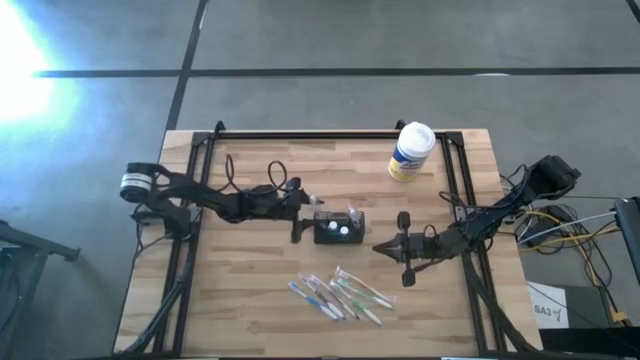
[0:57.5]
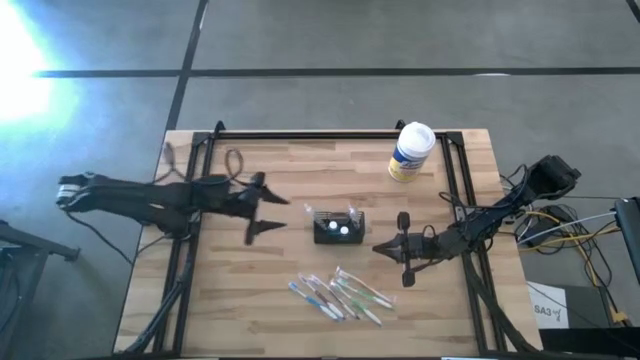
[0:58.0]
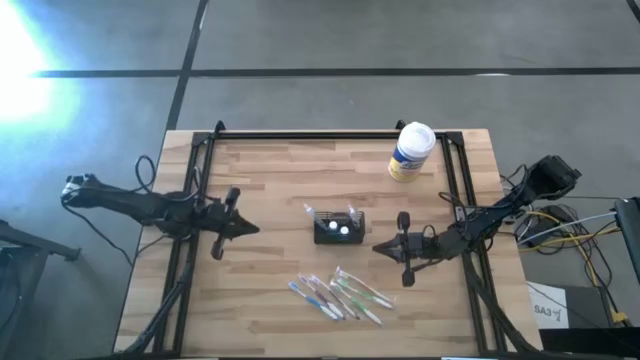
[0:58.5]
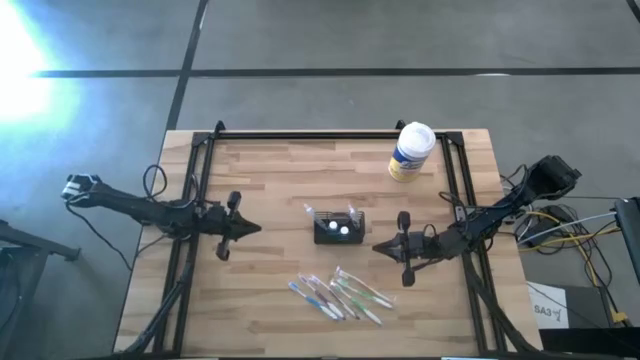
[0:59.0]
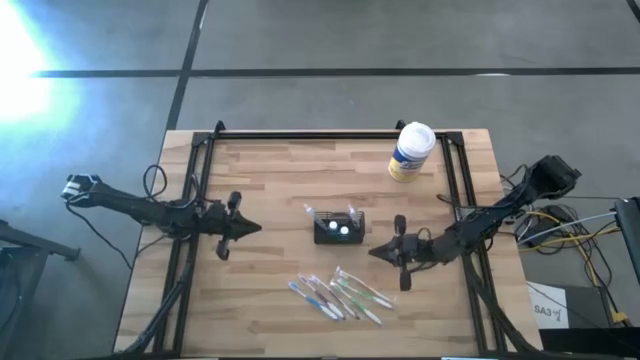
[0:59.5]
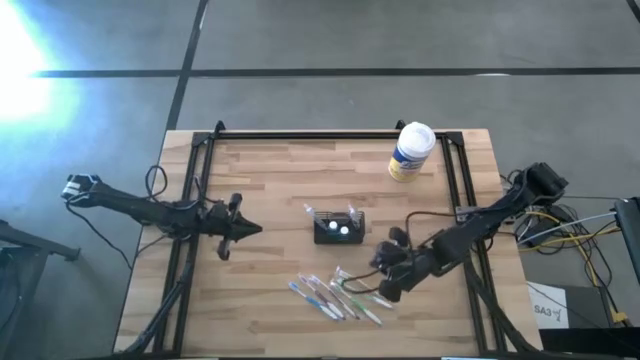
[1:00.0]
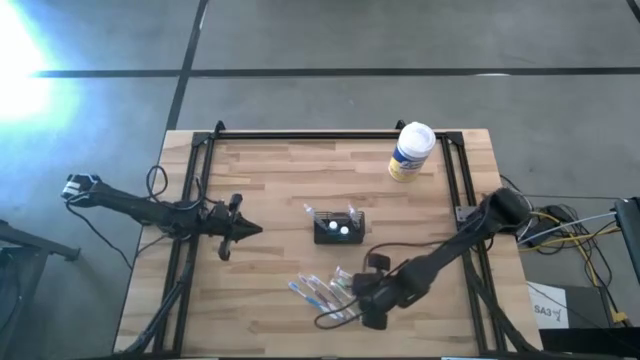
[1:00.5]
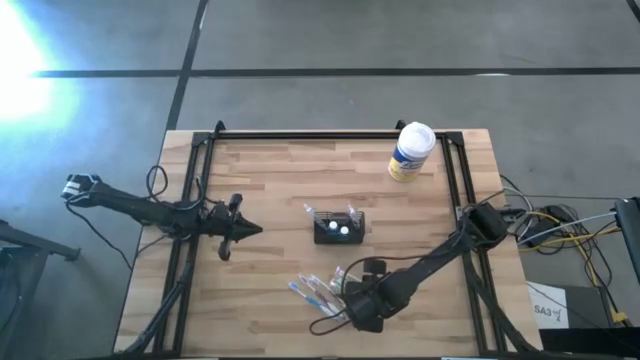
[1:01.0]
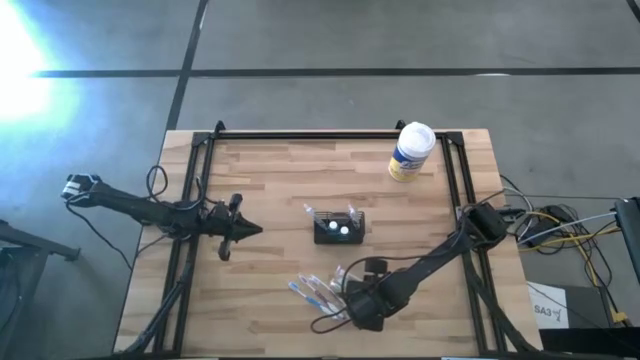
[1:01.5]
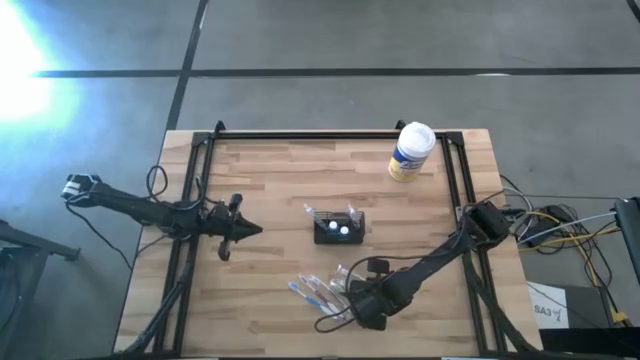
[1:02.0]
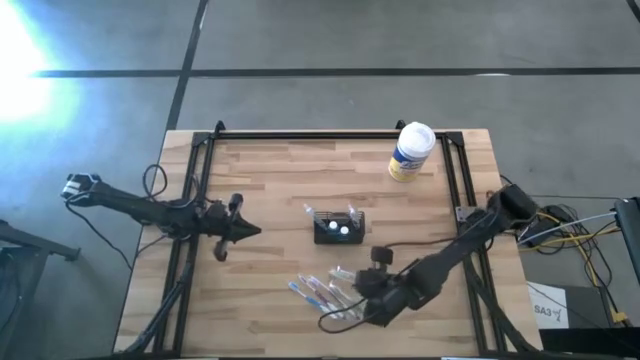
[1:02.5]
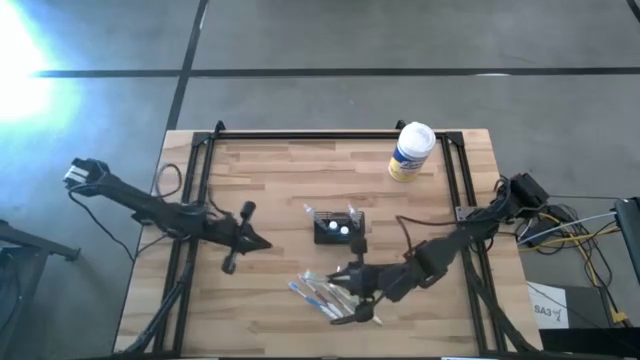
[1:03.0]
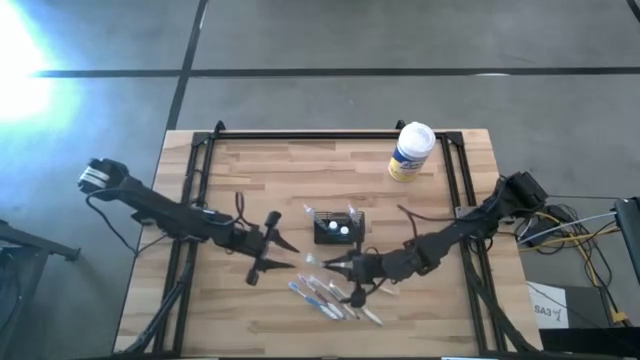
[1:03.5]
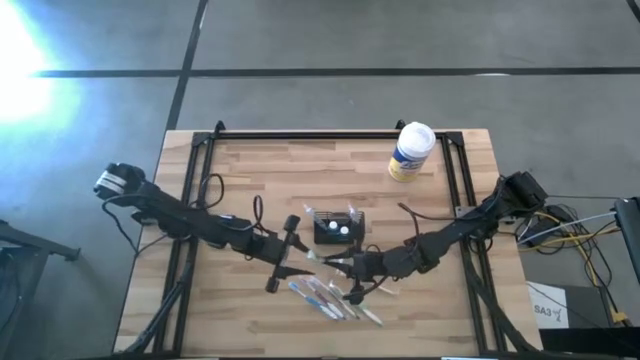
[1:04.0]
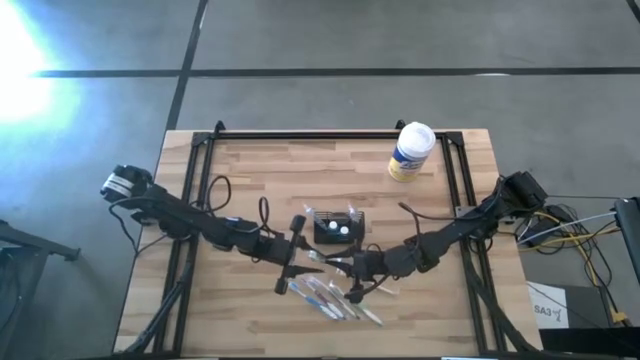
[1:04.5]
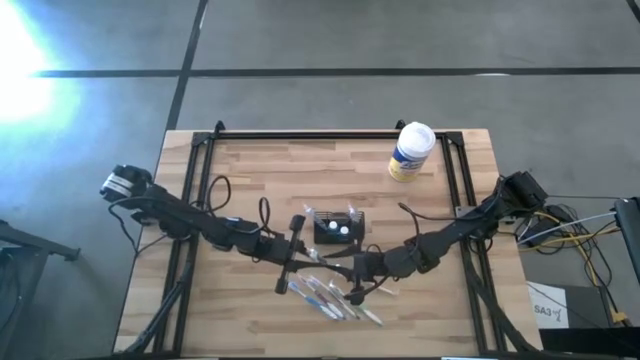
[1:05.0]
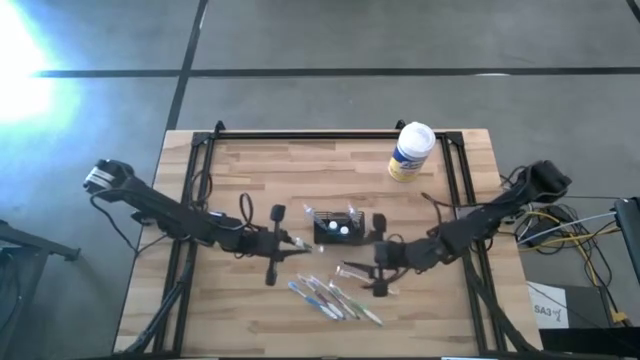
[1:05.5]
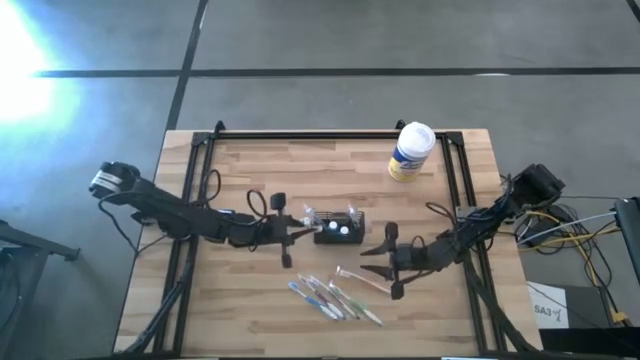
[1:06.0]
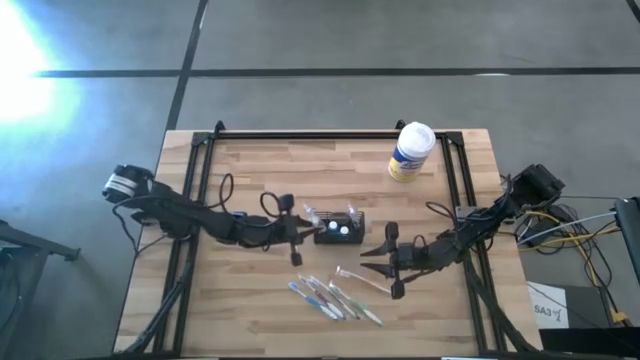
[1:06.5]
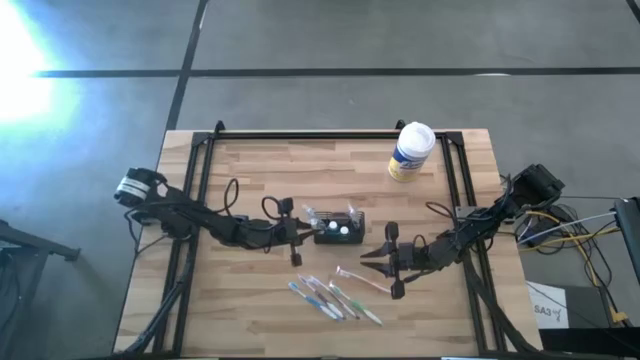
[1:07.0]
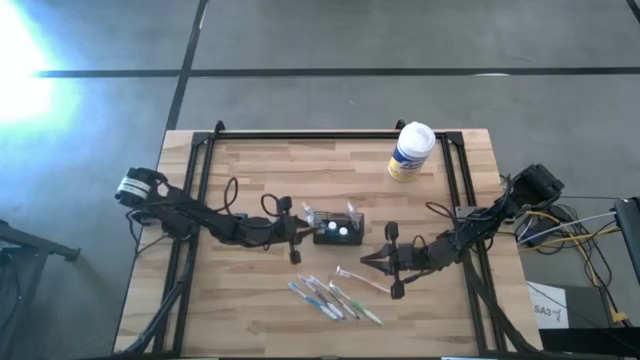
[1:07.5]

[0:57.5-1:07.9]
Task: Pick & Place toothbrushing station
Put the right green toothbrush into the black mesh organizer

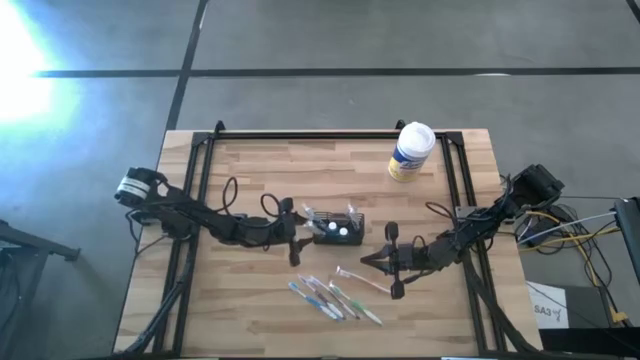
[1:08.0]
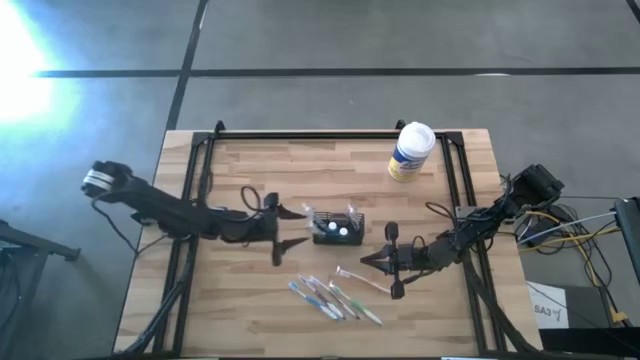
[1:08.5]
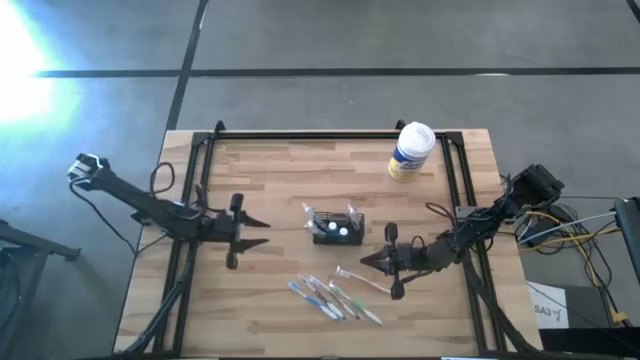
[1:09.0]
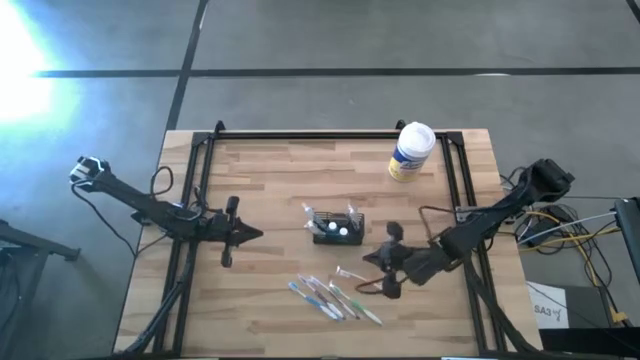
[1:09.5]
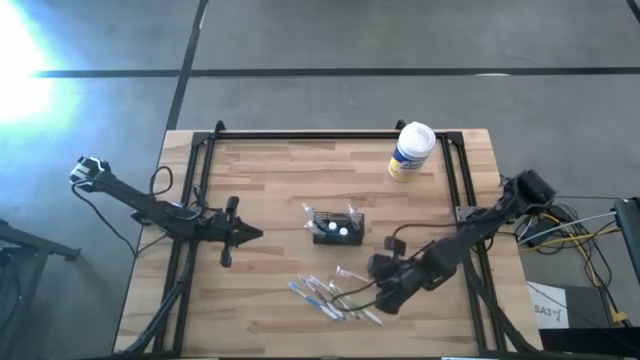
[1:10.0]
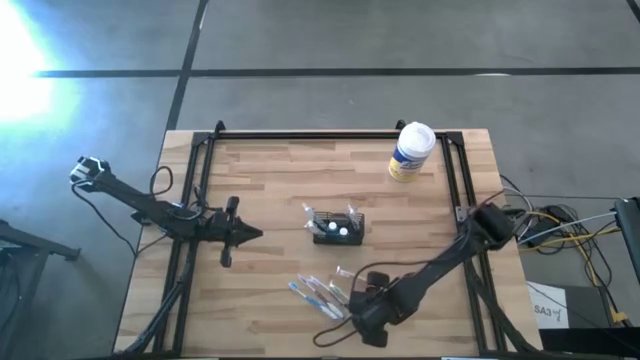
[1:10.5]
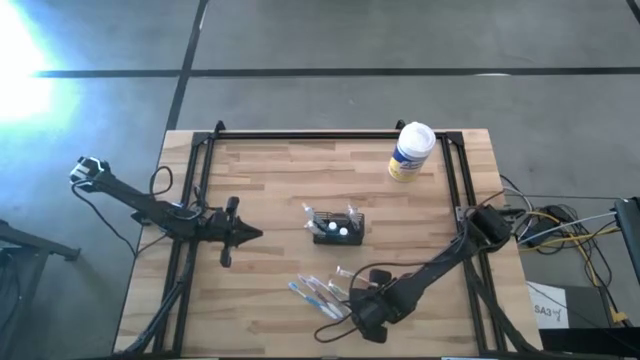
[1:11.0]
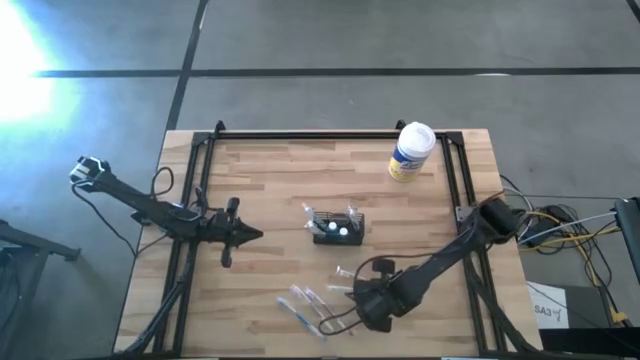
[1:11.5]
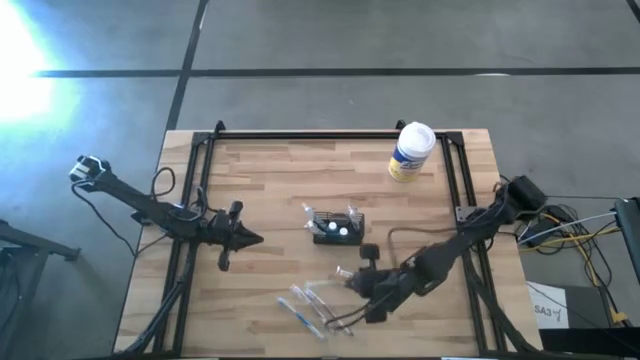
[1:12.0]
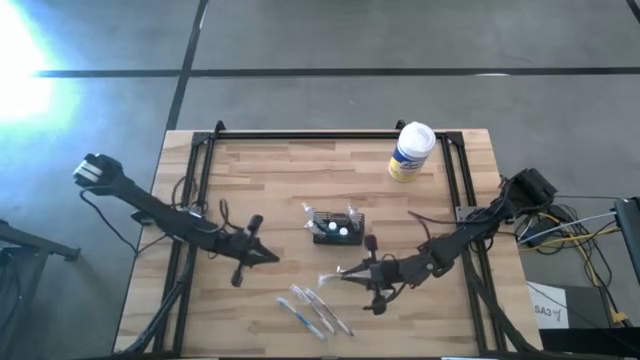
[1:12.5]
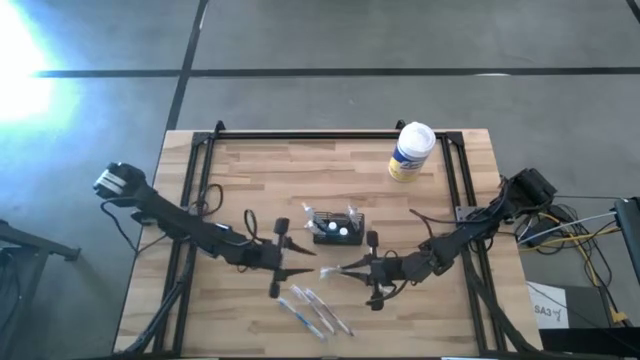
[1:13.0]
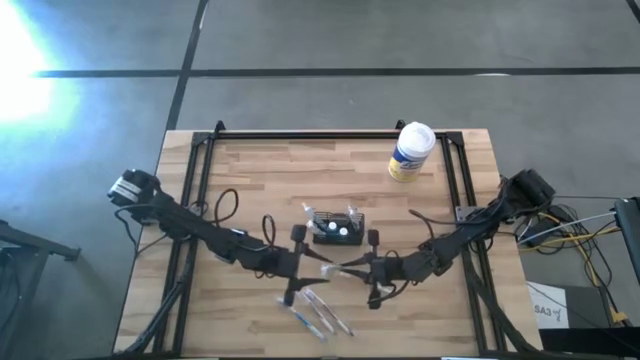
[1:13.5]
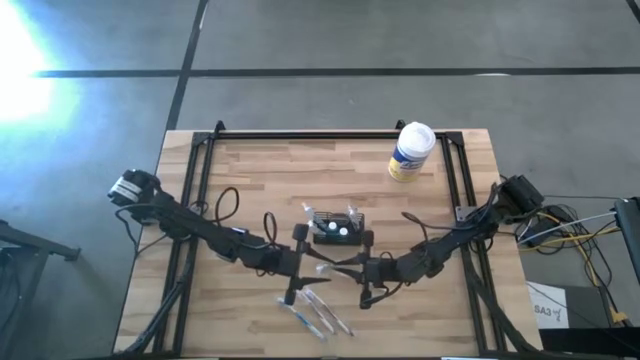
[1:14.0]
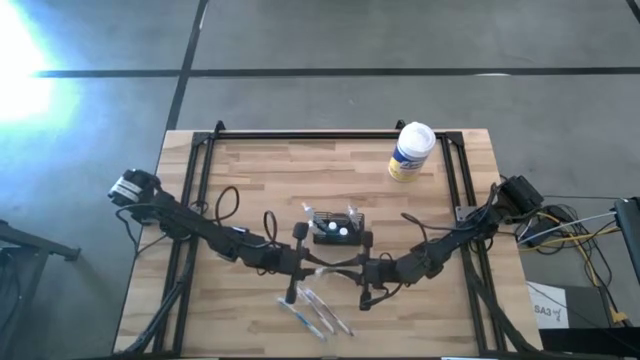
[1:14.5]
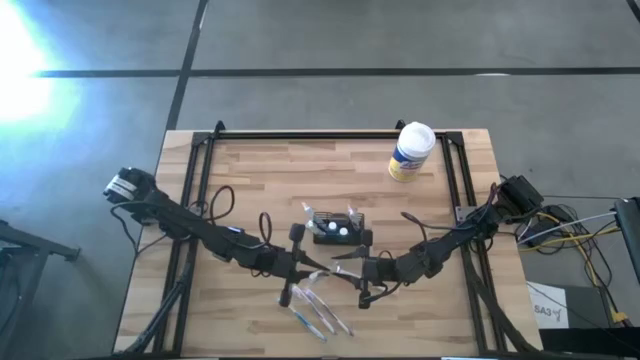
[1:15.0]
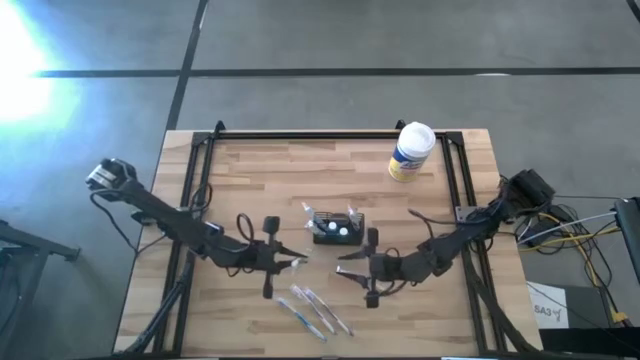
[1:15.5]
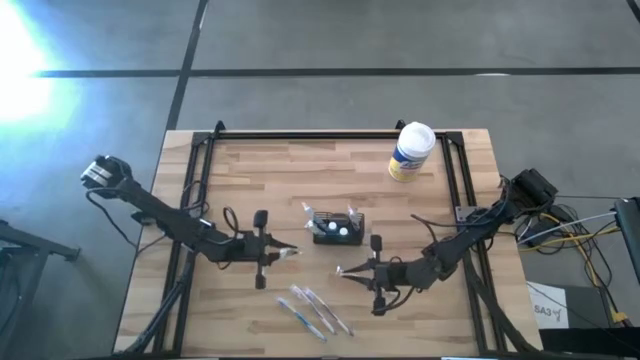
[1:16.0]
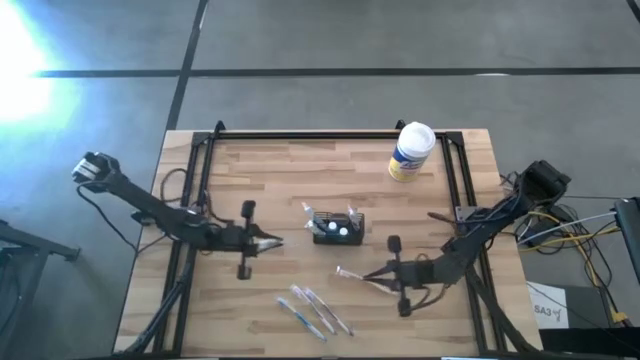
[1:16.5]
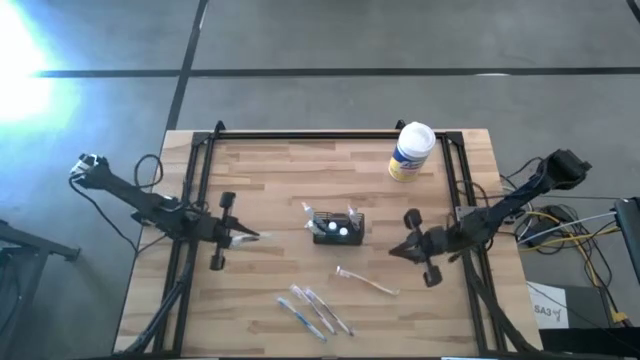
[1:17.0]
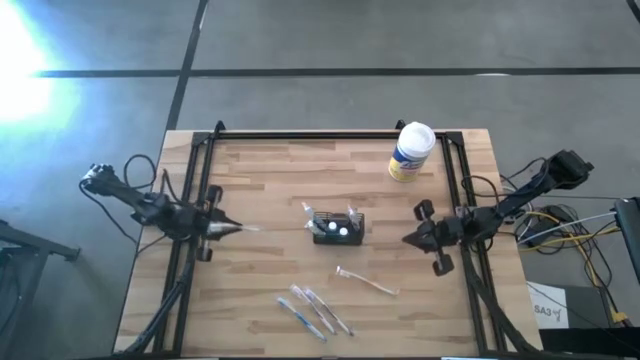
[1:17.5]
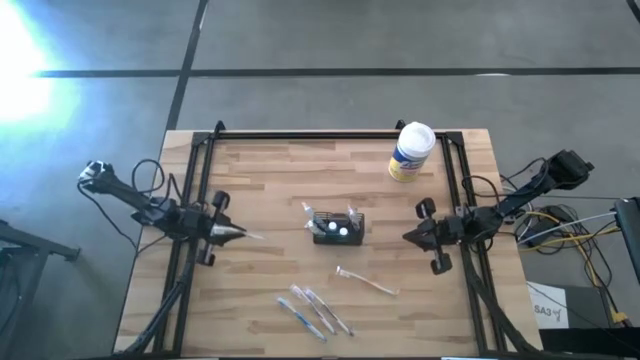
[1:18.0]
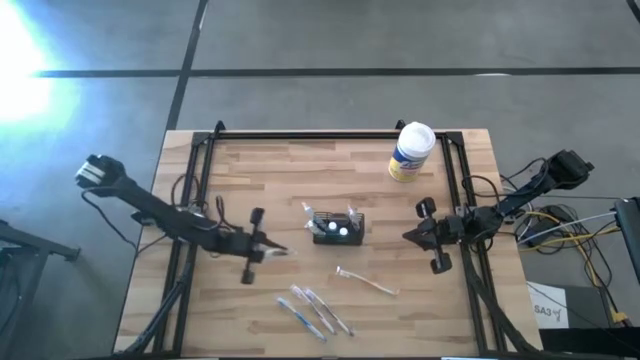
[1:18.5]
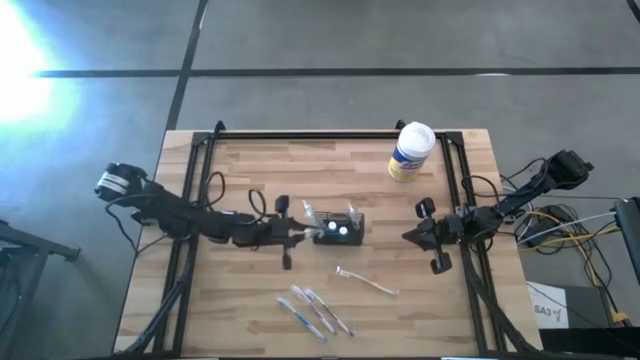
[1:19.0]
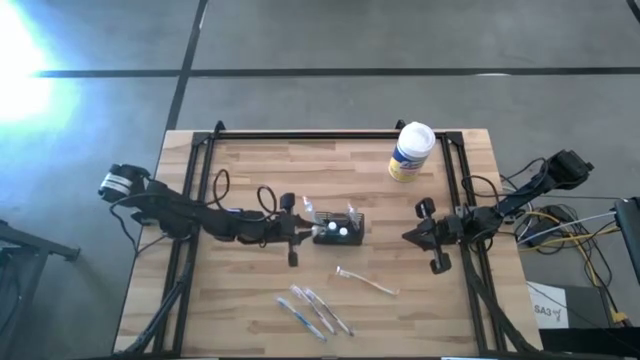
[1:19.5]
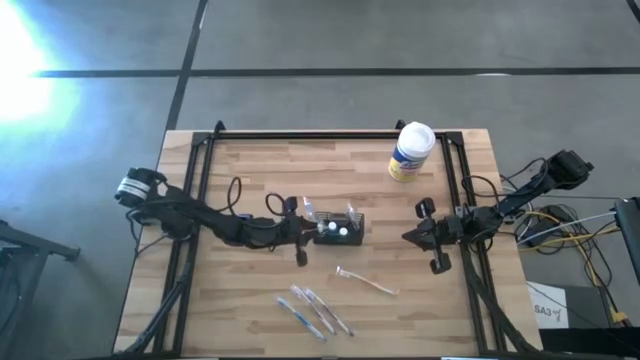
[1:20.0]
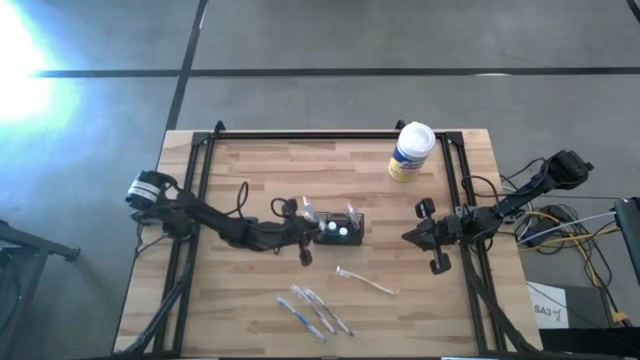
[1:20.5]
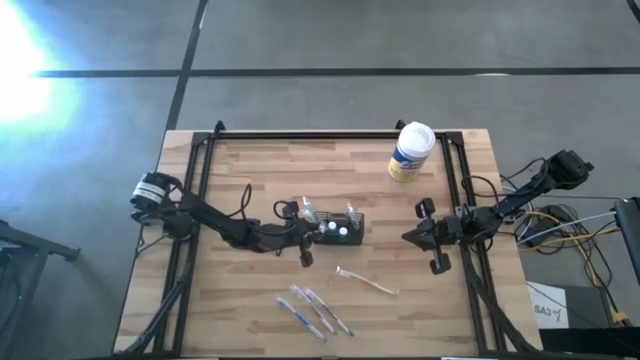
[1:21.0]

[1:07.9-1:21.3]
Put the green toothbrush into the black mesh organizer
